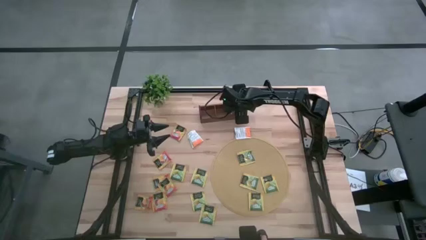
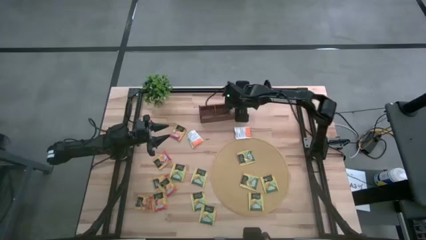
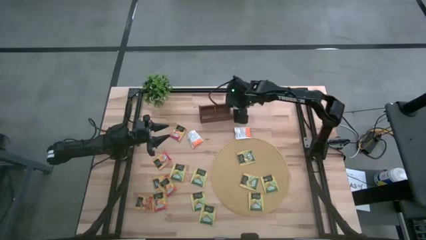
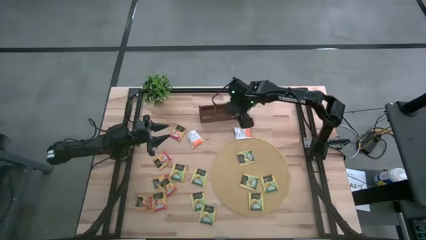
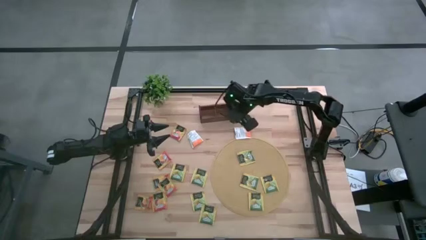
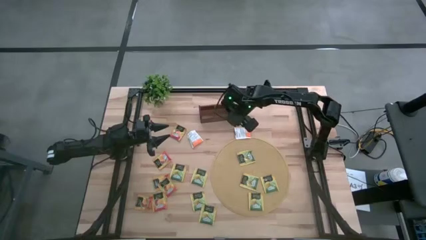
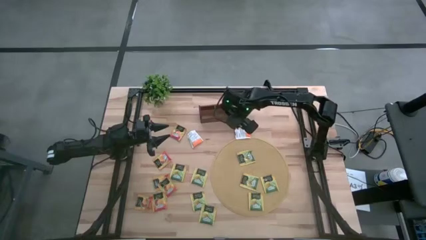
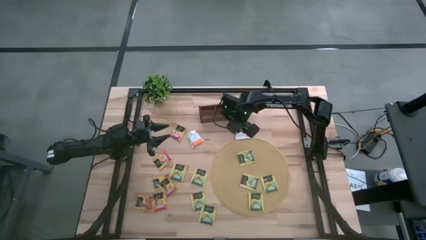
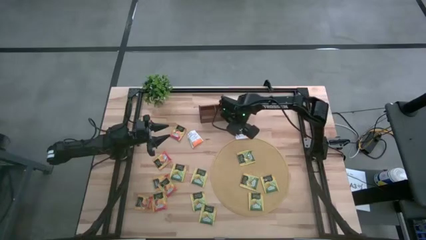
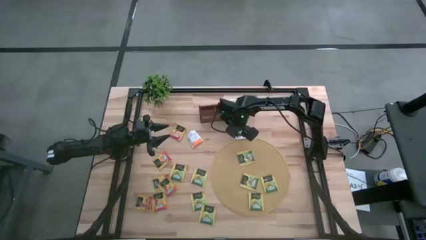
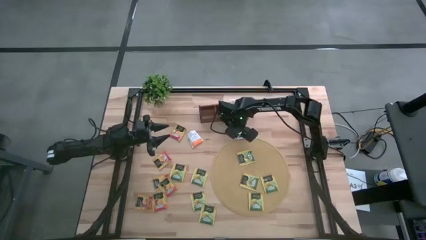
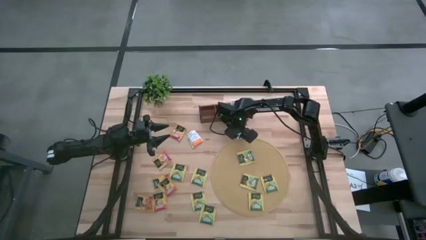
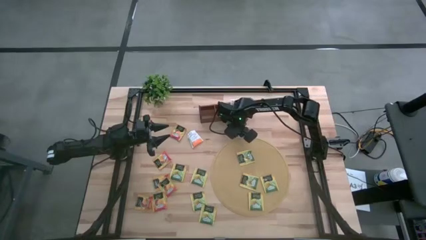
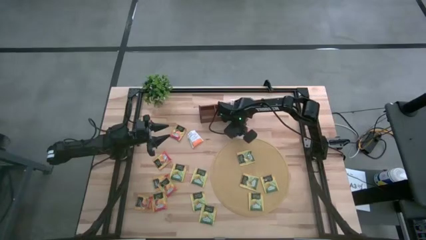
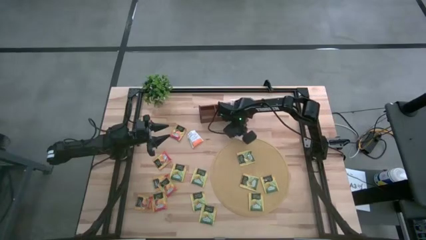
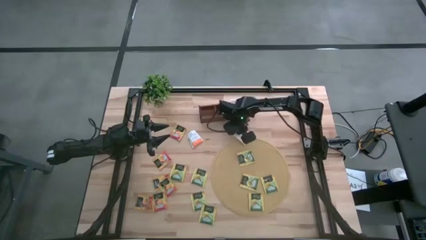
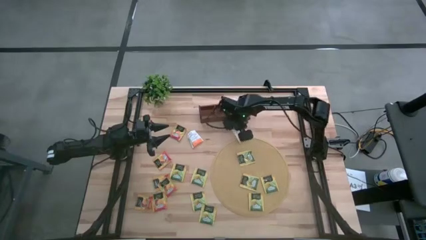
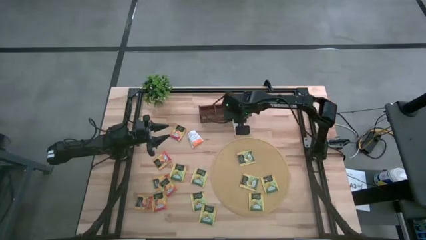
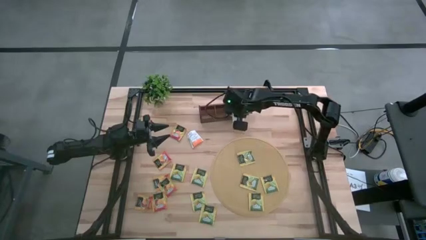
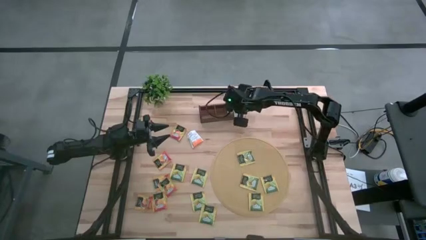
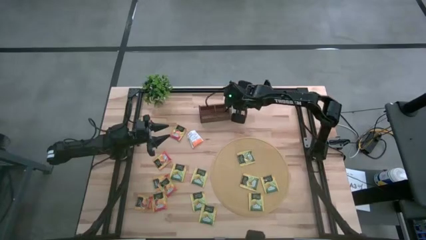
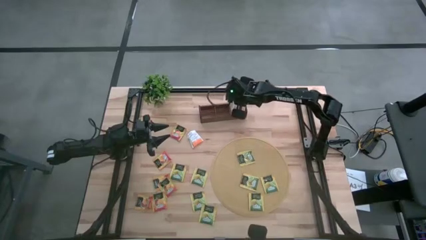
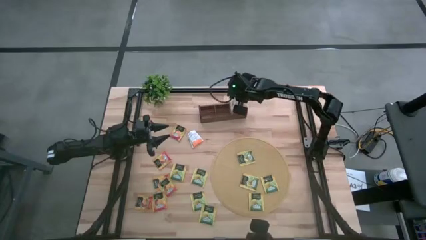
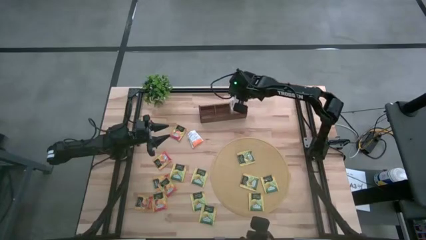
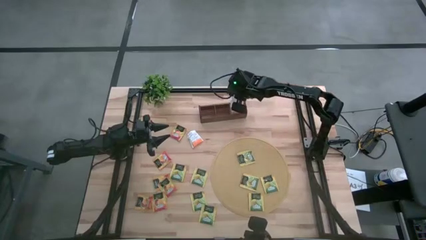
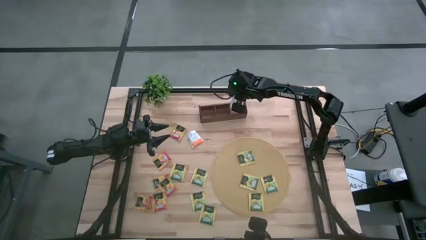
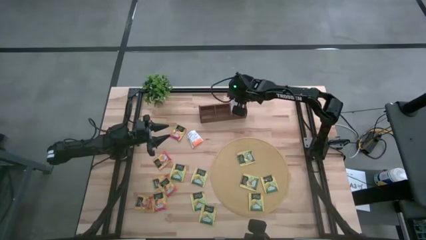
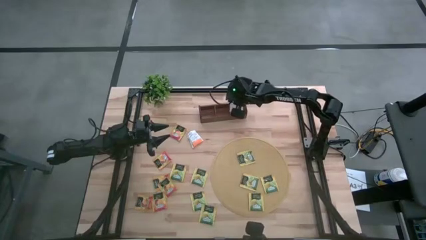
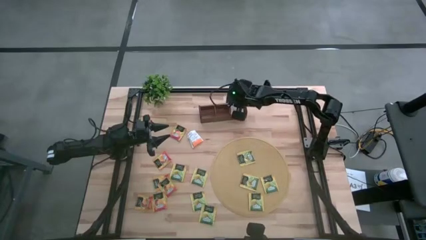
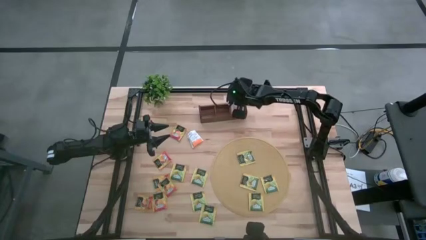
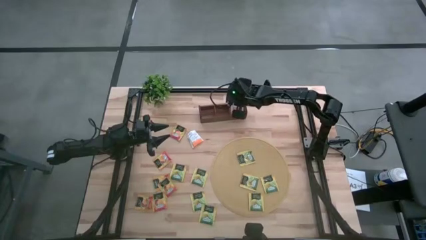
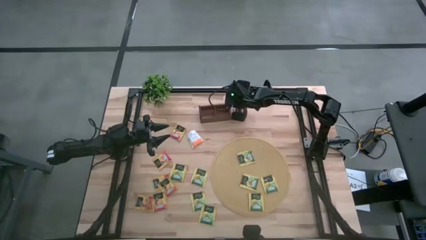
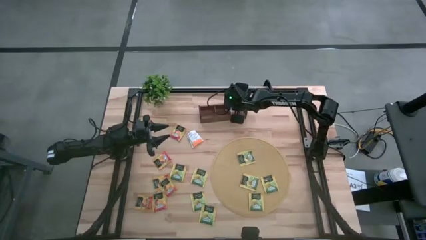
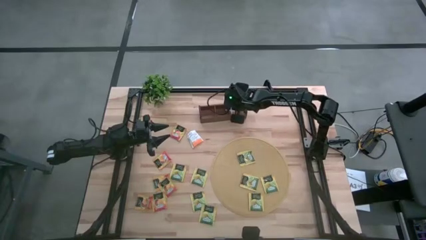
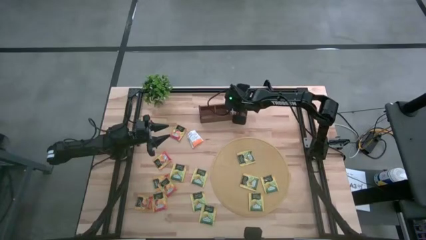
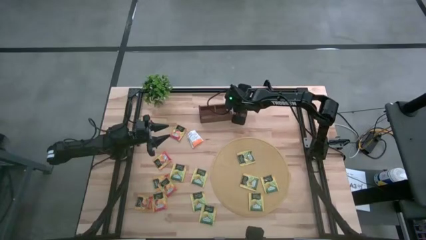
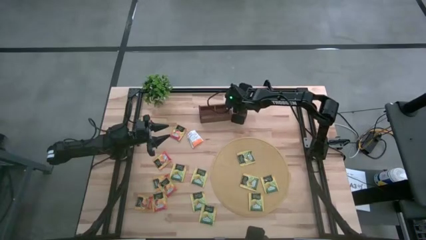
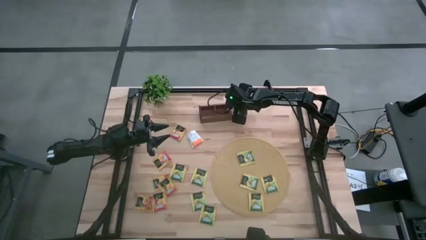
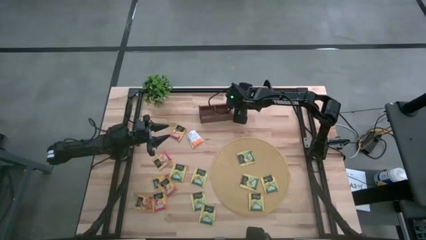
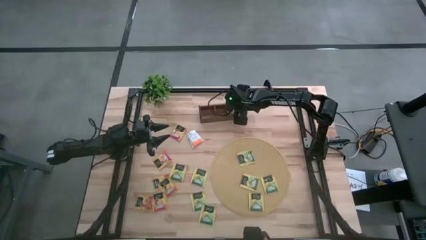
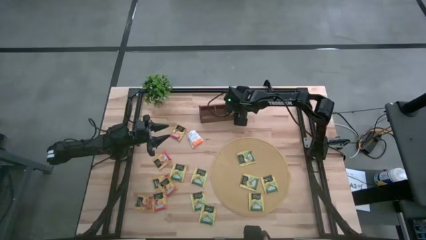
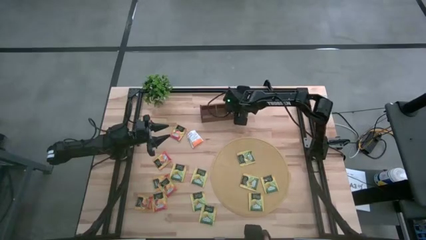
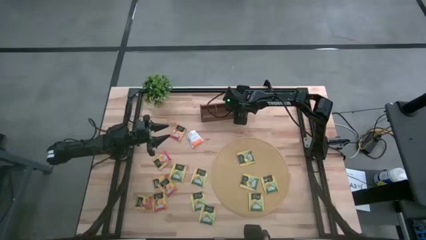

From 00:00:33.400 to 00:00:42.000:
Task: Pick & Place Tea
Put the white tea bag into the right section of the wooden organizer

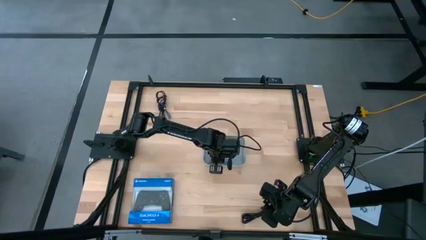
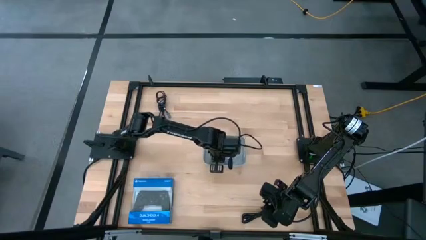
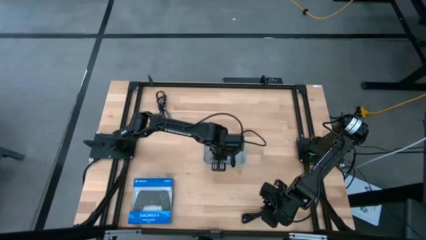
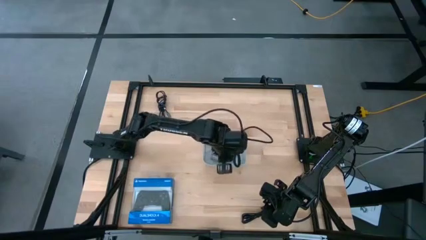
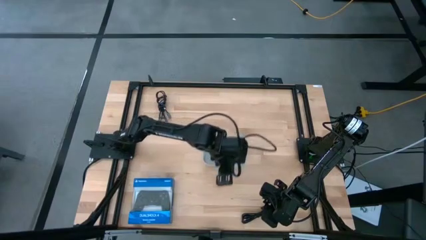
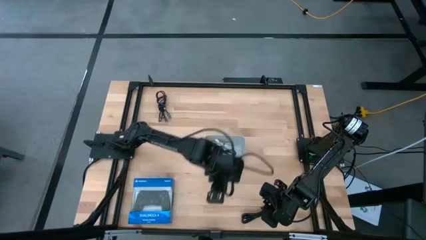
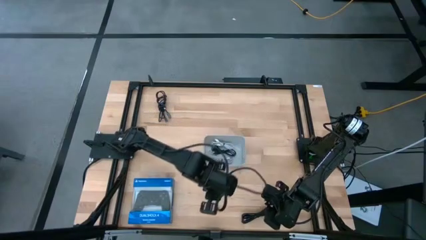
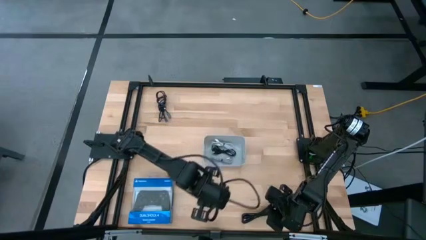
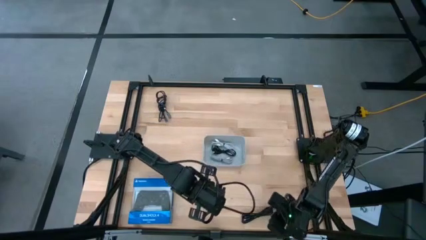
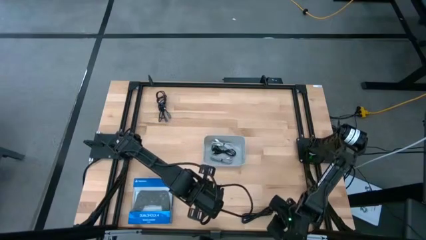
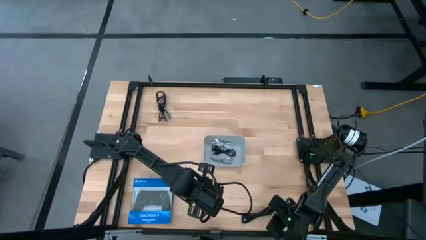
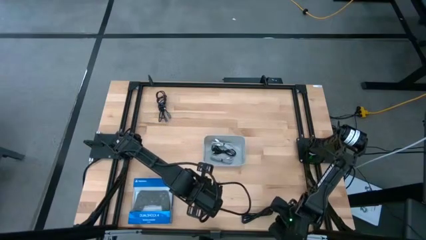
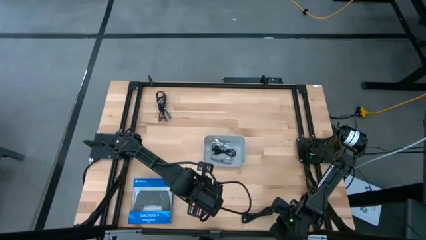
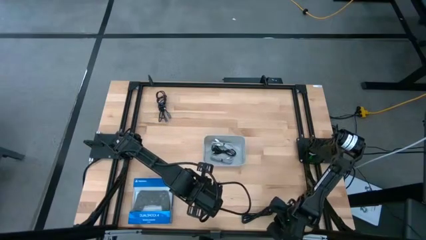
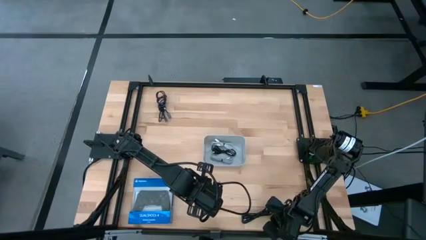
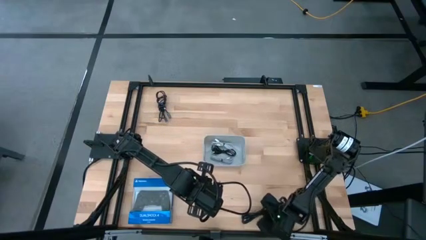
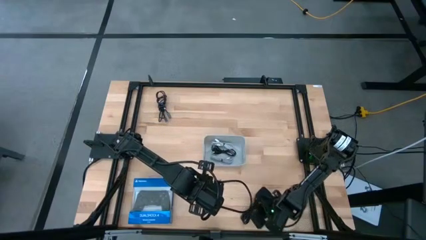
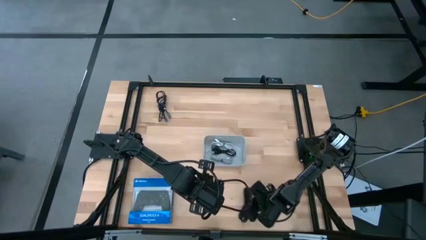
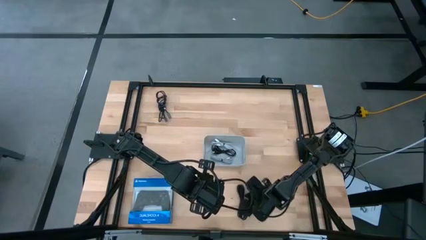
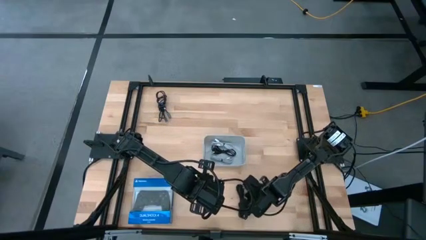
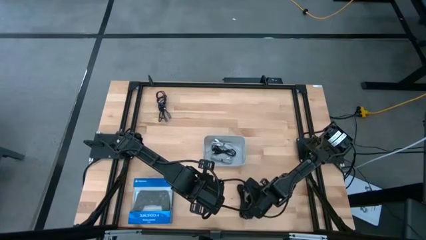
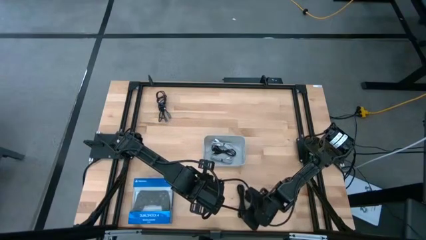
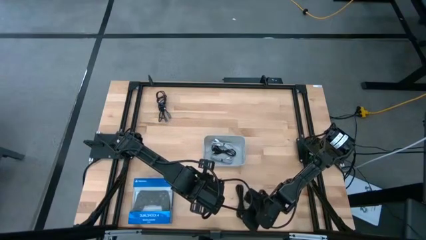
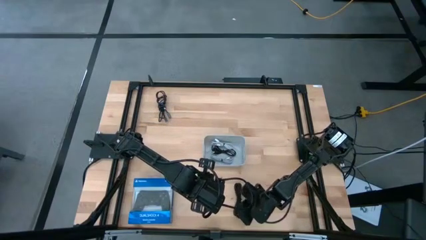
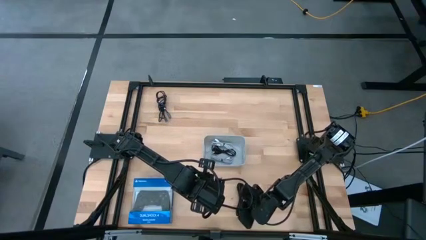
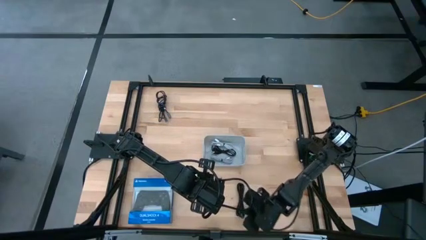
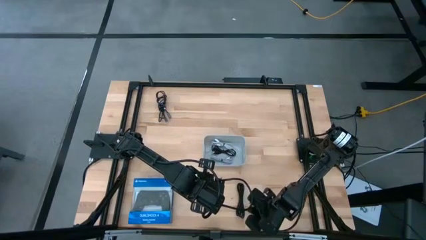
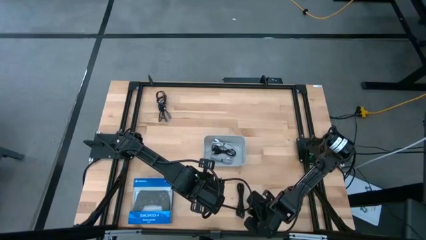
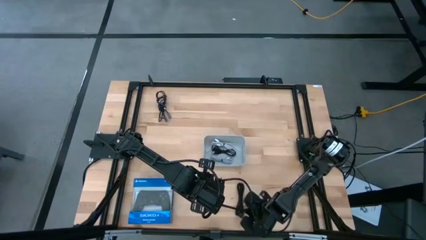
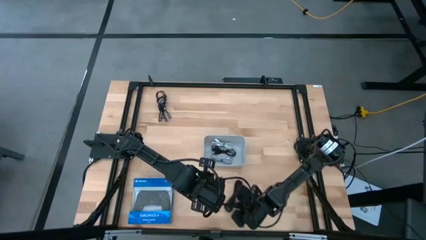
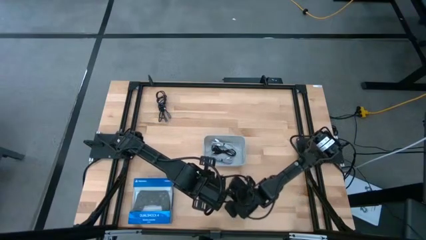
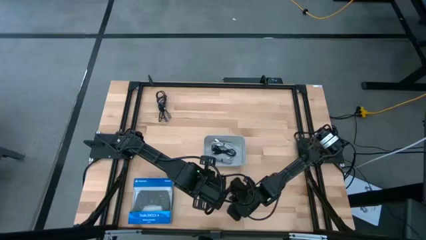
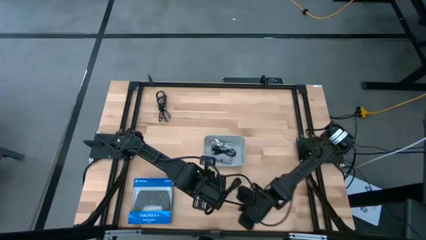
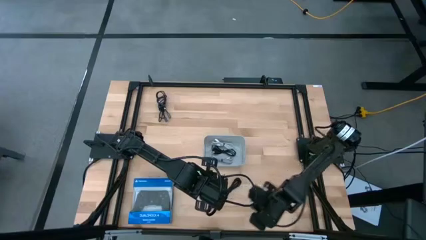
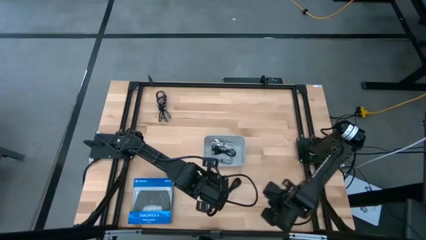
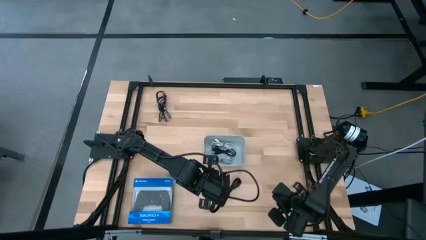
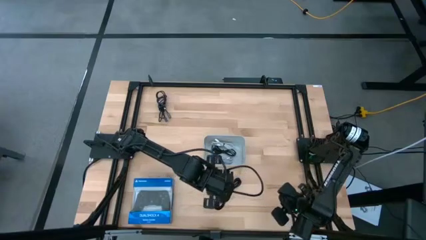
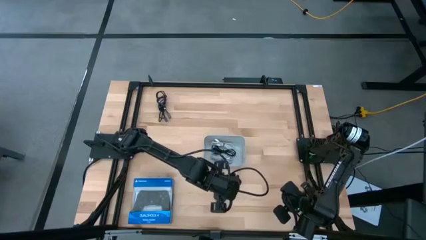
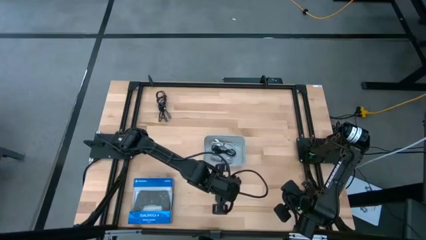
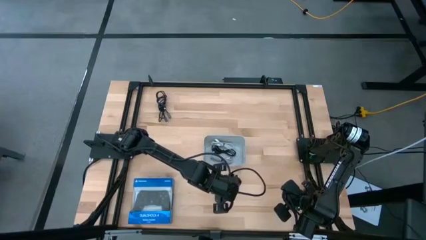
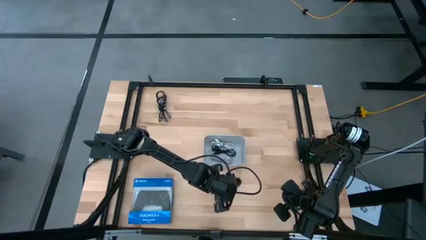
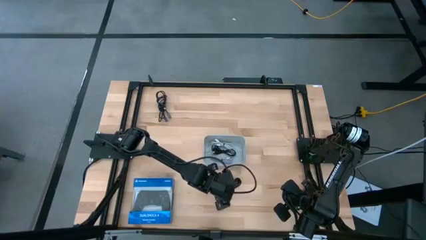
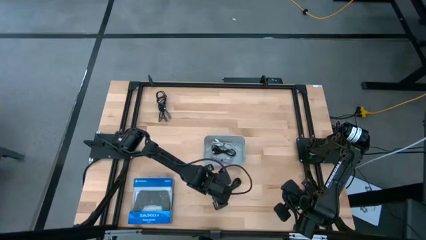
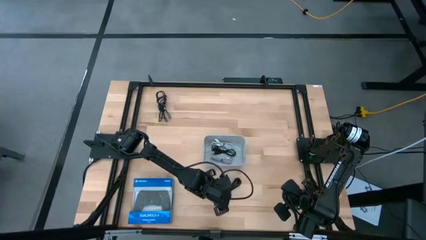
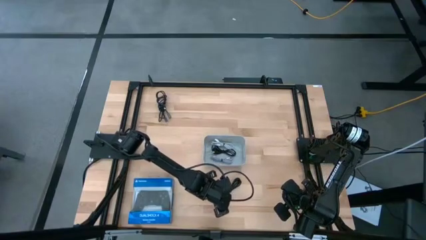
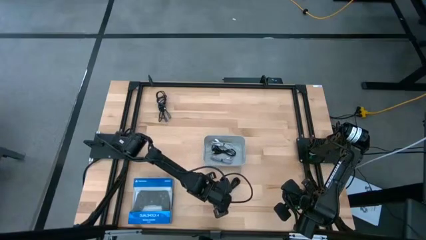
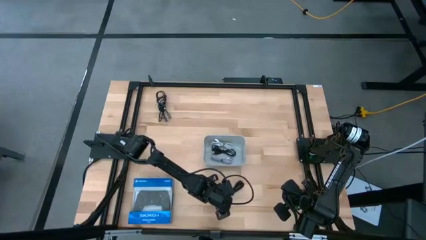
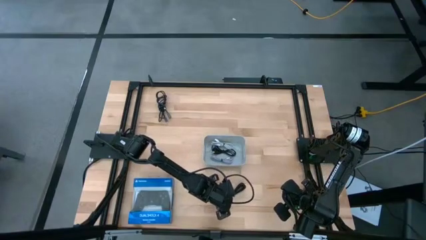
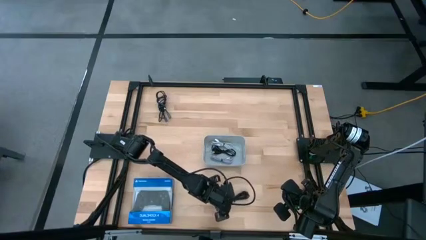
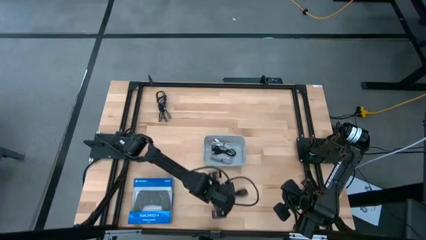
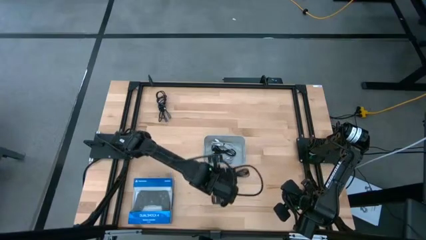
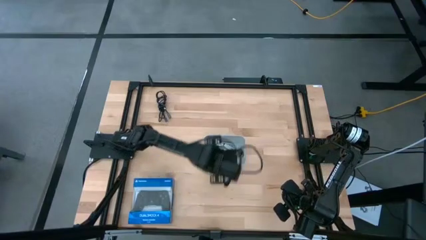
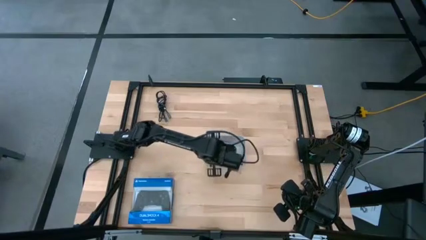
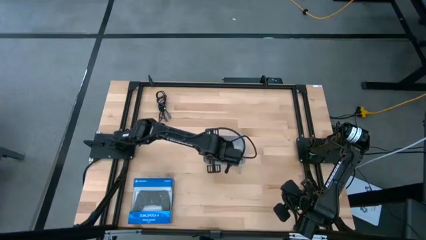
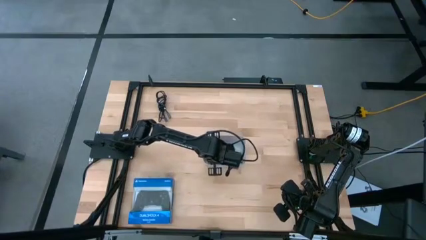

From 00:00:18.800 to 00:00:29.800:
Task: Pick and place USB-C Cables
Put the bottom black charger into the gray bin
